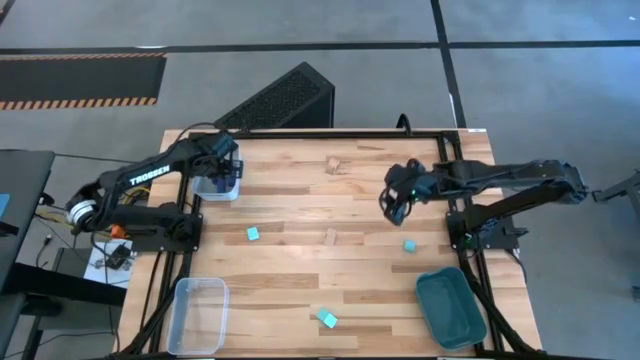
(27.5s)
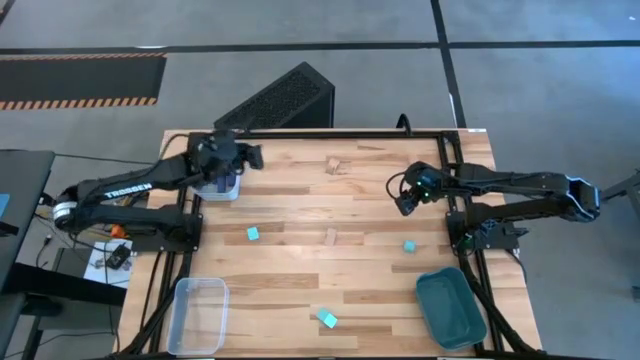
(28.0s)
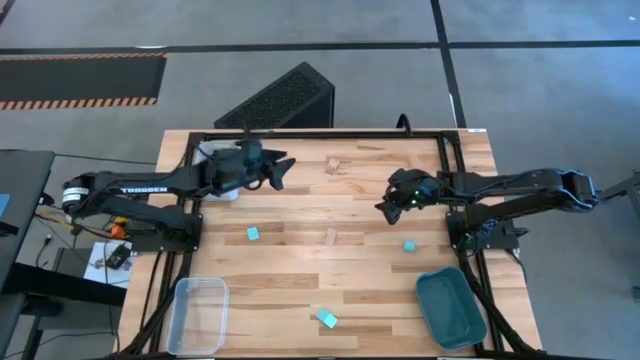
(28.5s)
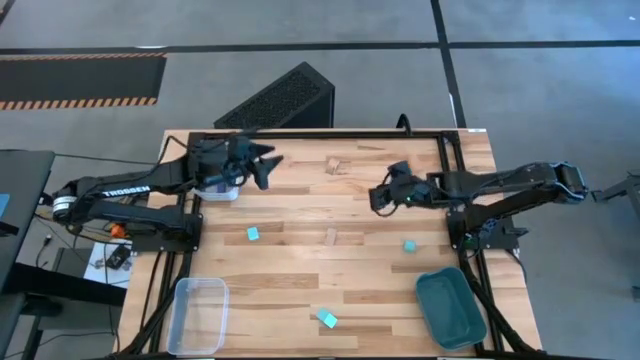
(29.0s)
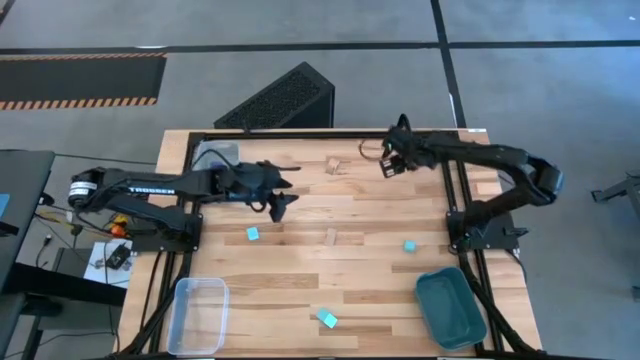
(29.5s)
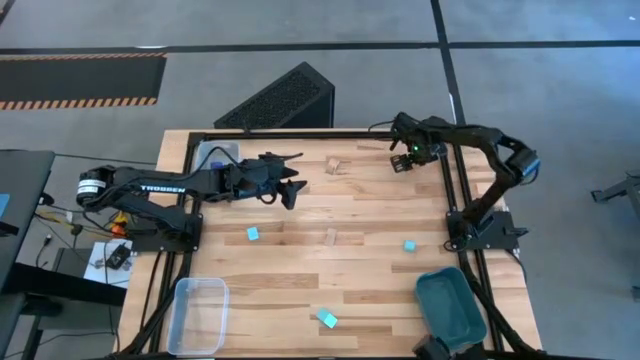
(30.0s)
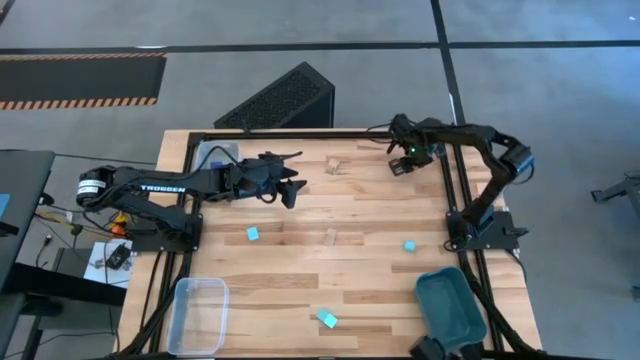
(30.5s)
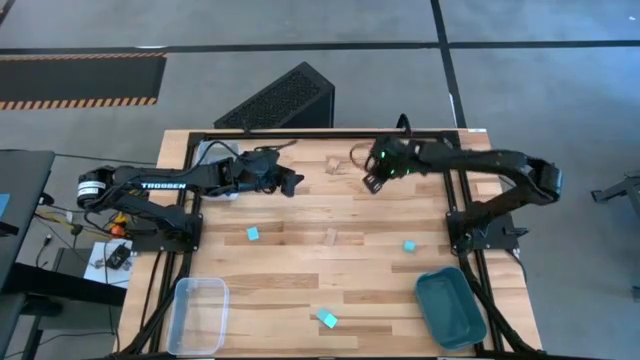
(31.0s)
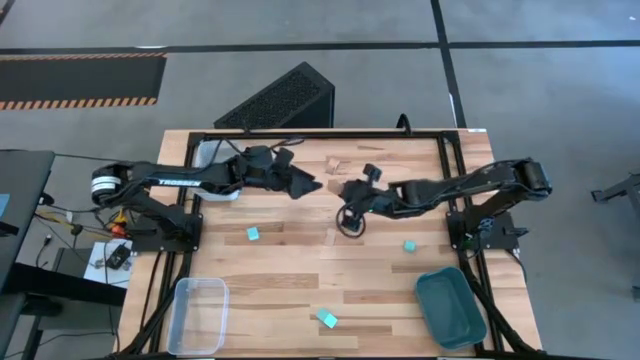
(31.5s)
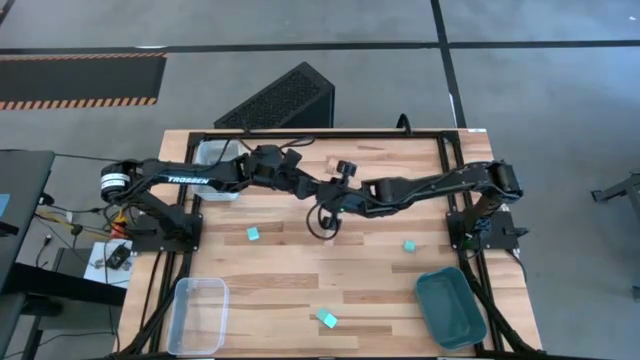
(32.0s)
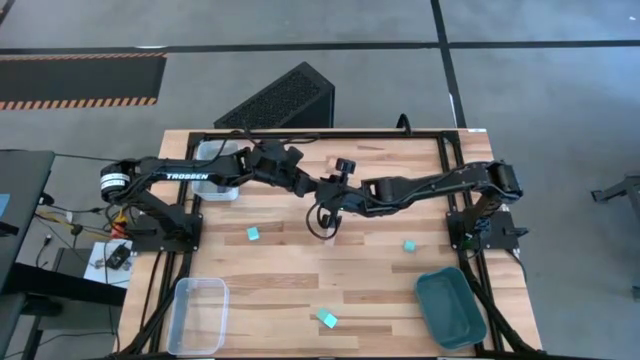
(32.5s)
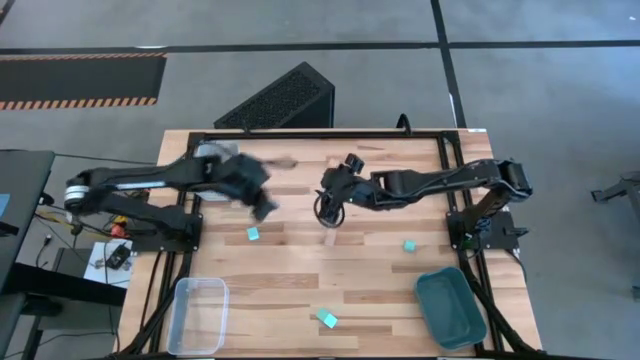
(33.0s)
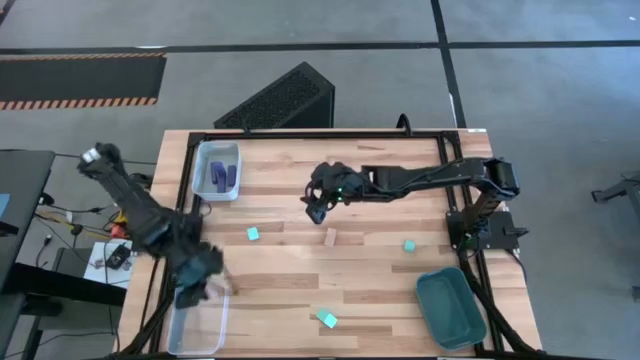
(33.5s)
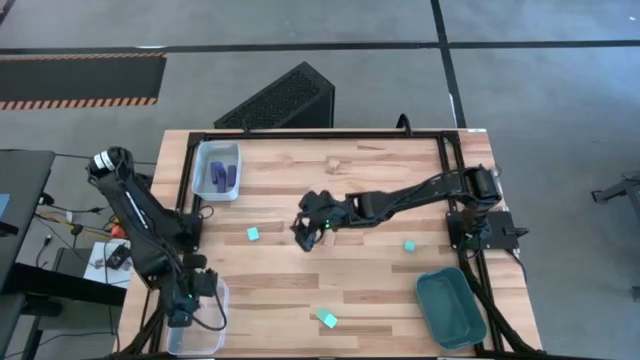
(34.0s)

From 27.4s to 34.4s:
Task: Sort & place blocks by color
Put the top right brown block into the transparent bin

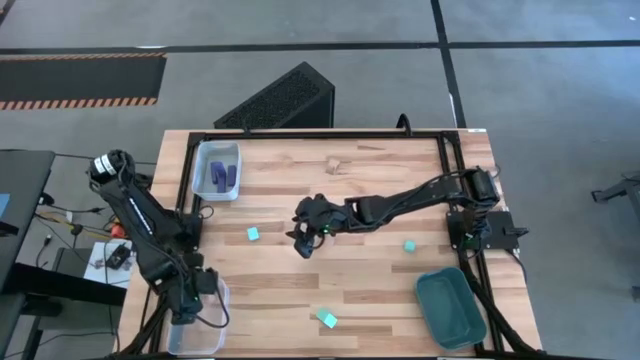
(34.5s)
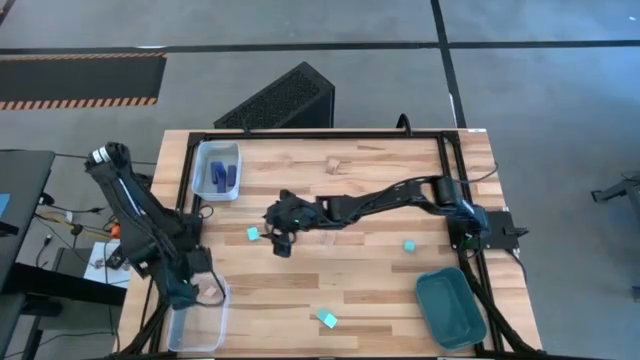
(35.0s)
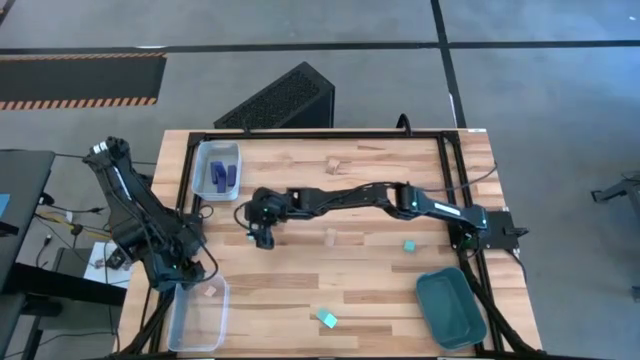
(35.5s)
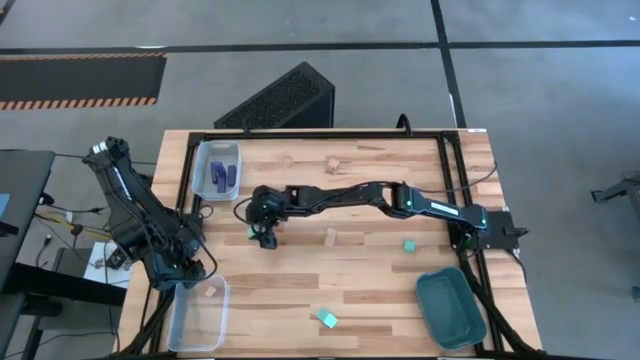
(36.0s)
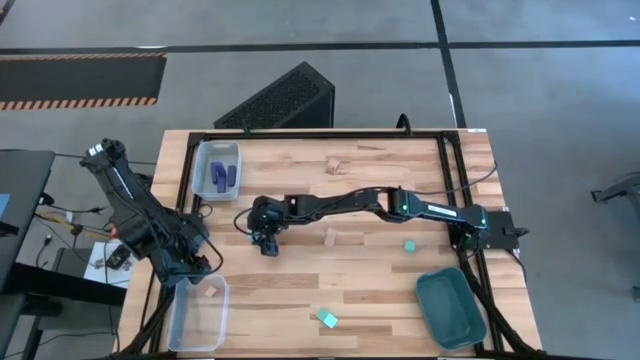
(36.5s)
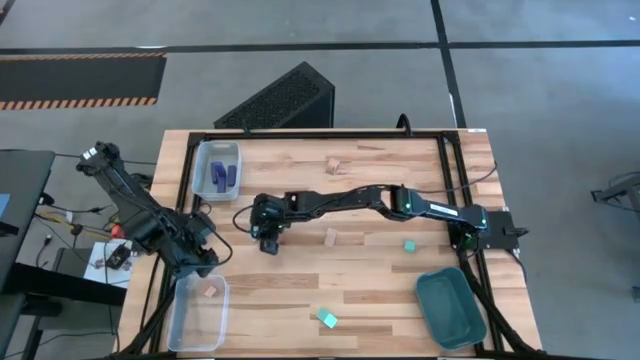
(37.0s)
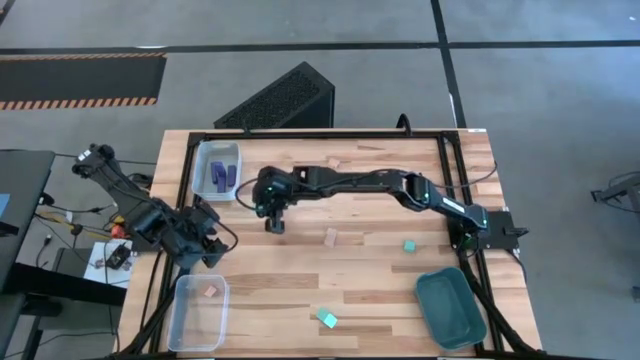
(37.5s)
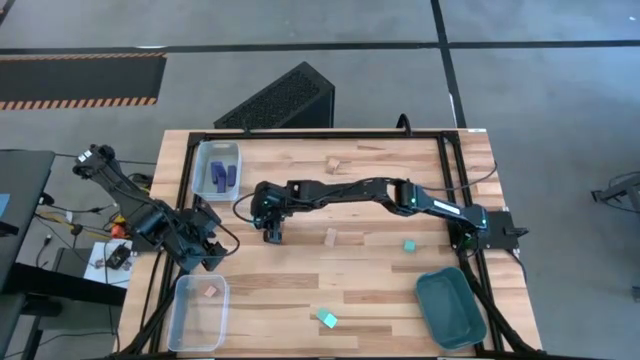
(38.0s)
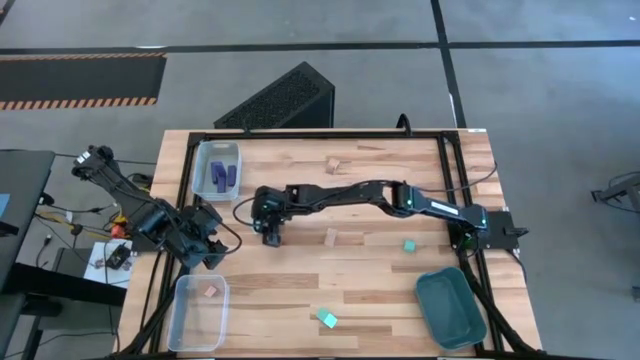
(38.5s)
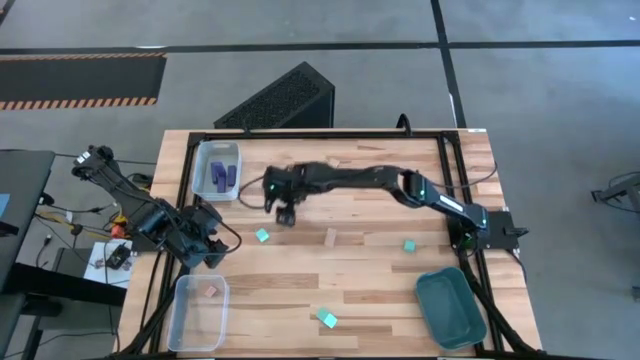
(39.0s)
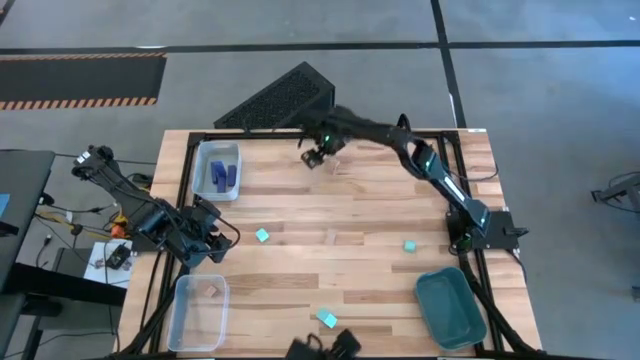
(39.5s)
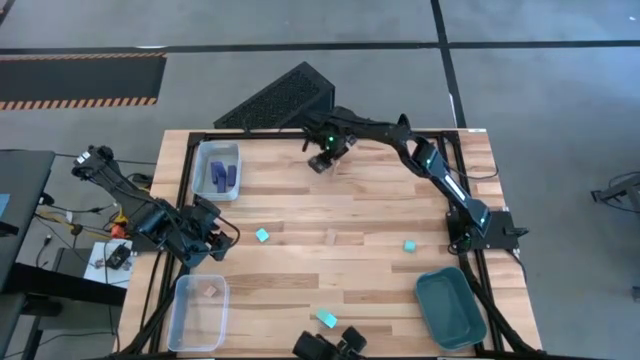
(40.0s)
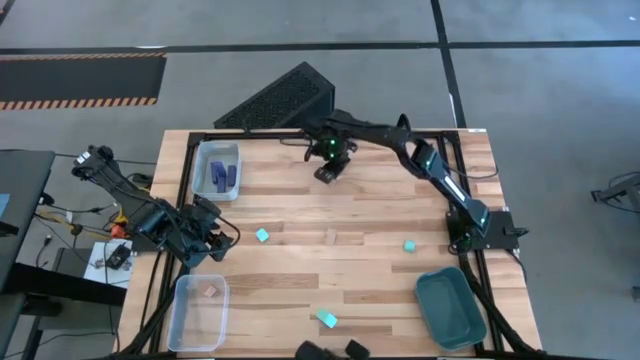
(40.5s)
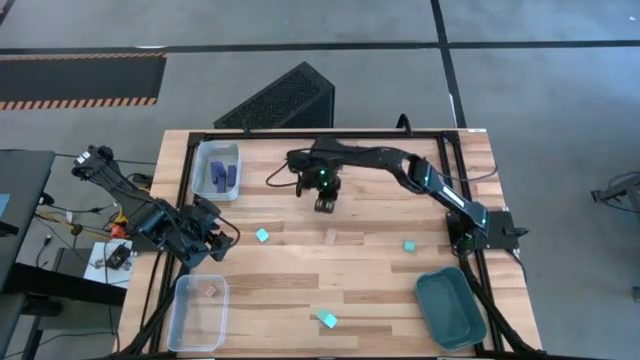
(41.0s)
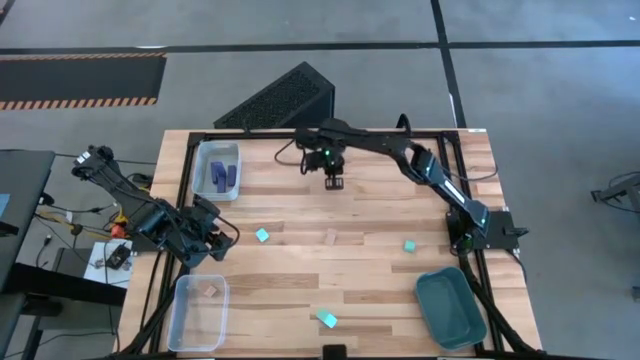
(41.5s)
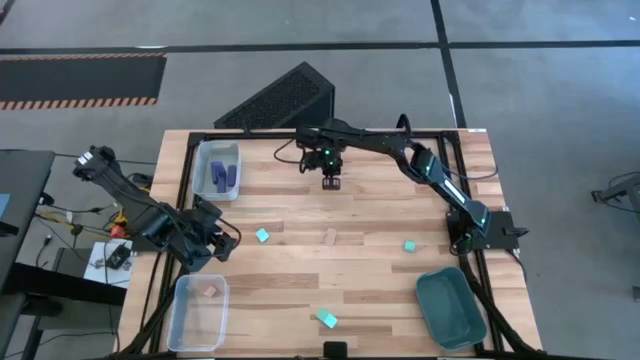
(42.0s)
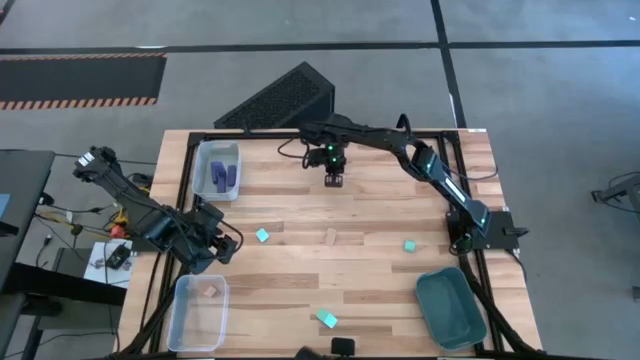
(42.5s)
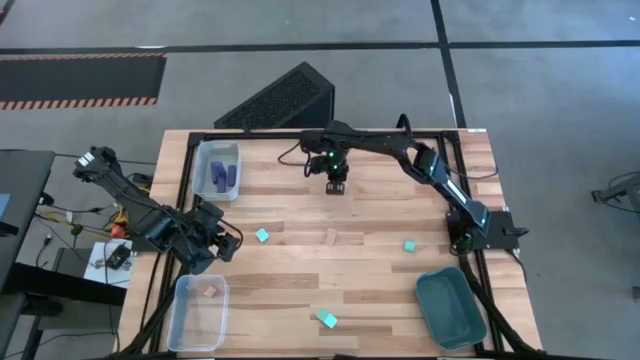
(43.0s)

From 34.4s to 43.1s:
Put the top brown block into the transparent bin

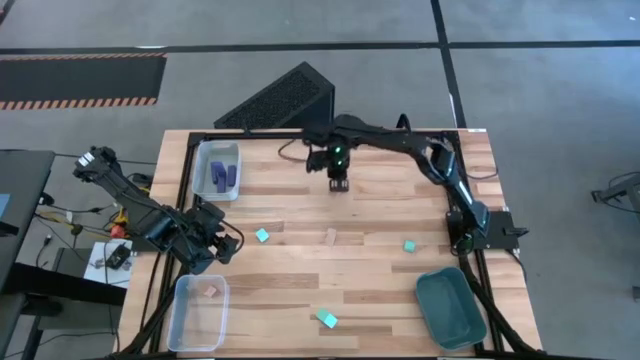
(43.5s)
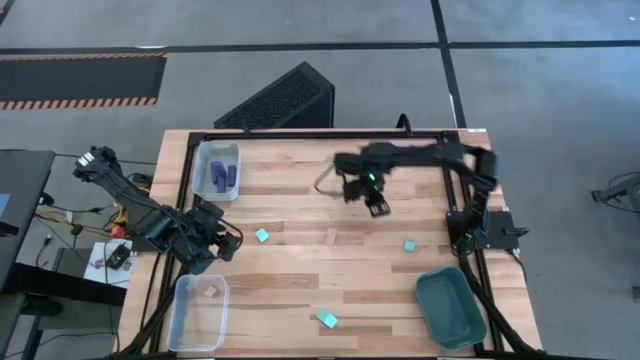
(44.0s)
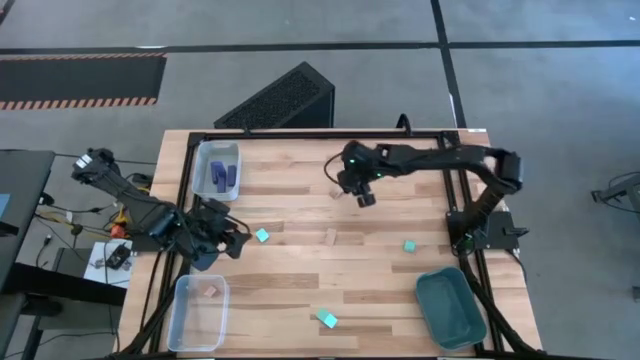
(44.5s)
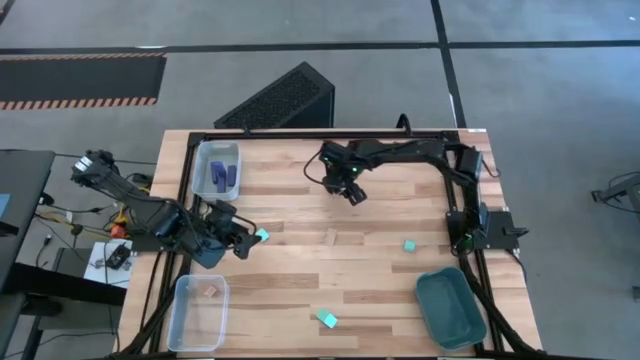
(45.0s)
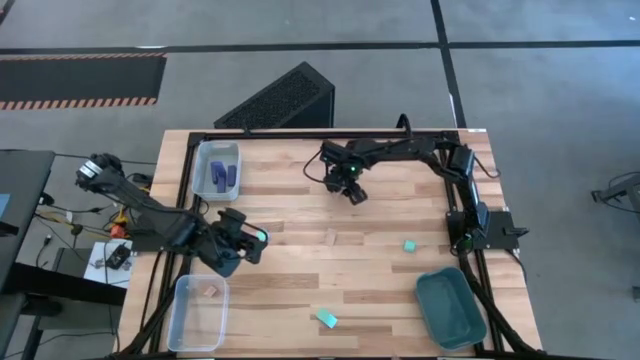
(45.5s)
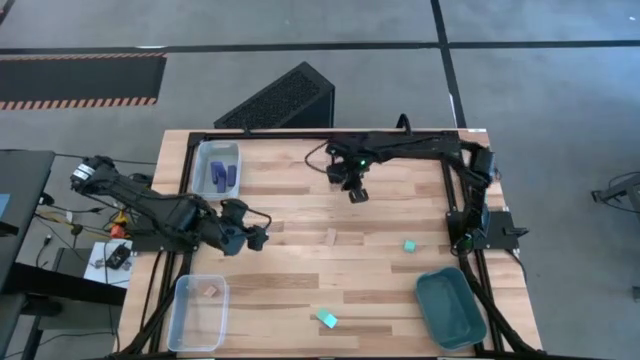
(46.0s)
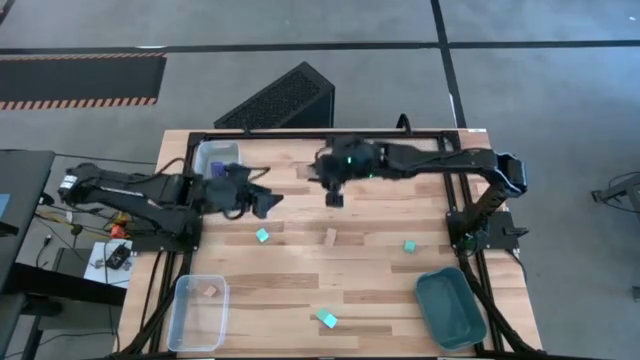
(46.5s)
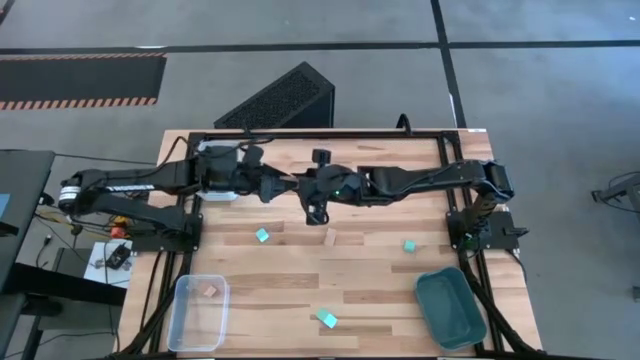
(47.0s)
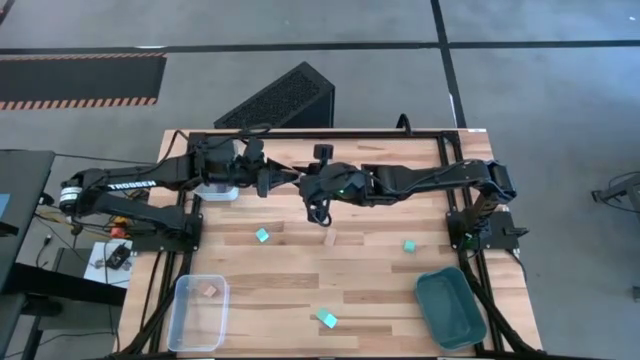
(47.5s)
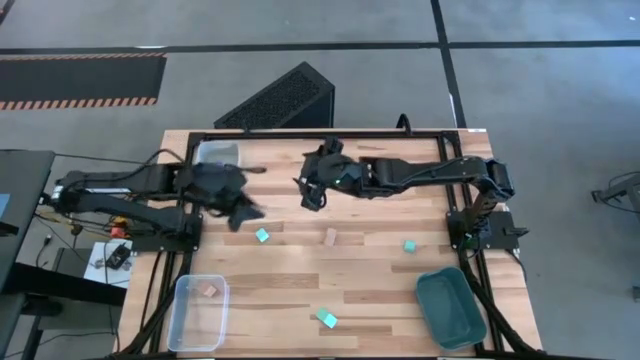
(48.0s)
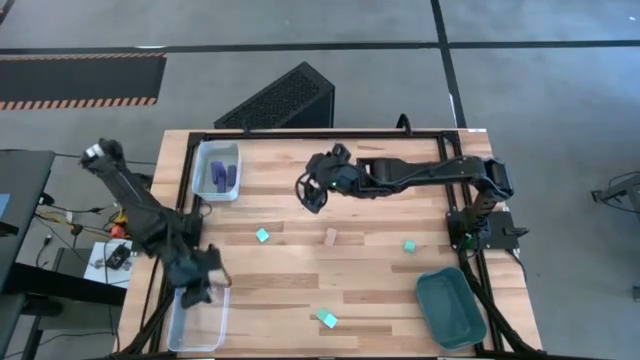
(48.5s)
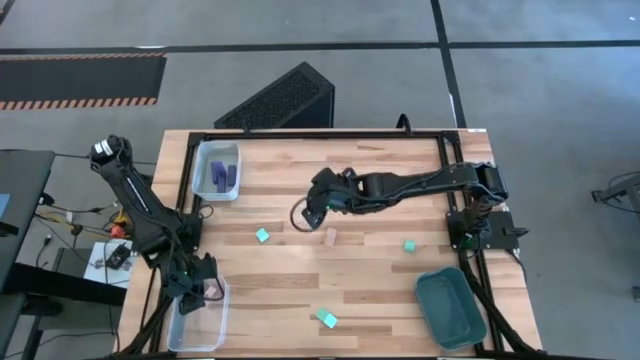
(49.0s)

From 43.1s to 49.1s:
Put the top brown block into the transparent bin
